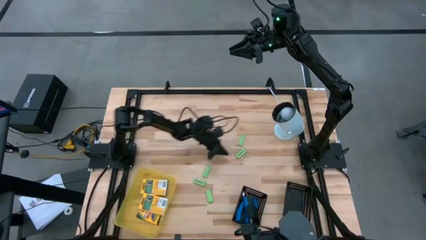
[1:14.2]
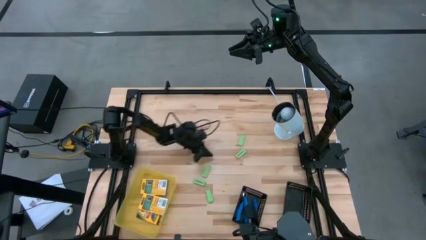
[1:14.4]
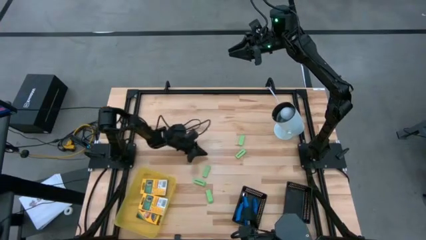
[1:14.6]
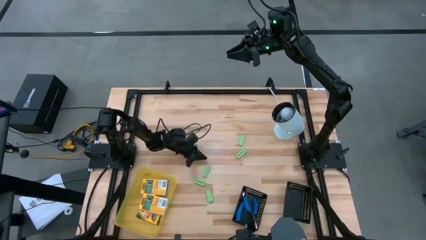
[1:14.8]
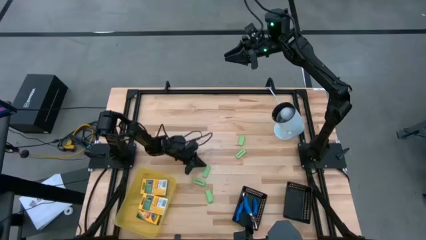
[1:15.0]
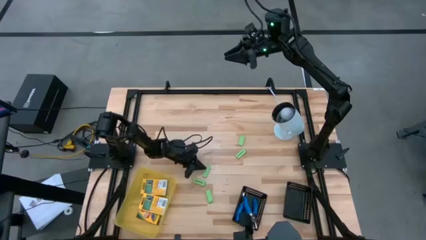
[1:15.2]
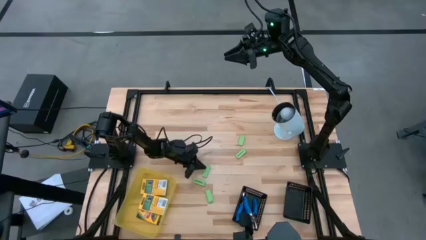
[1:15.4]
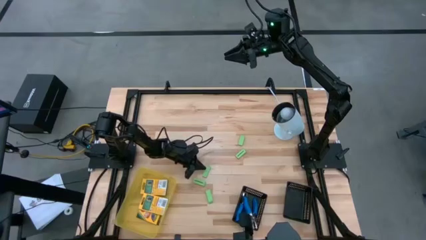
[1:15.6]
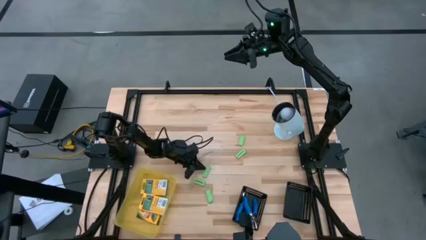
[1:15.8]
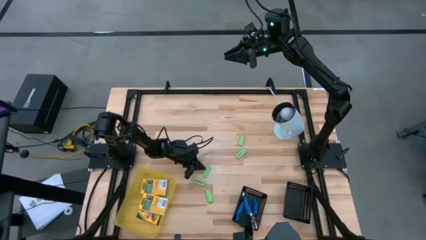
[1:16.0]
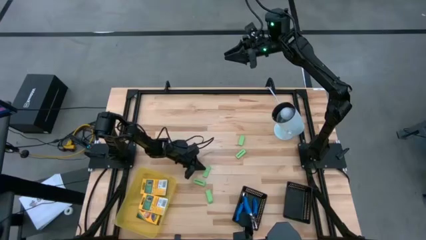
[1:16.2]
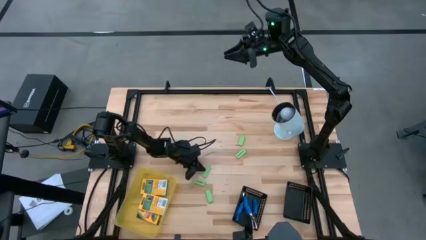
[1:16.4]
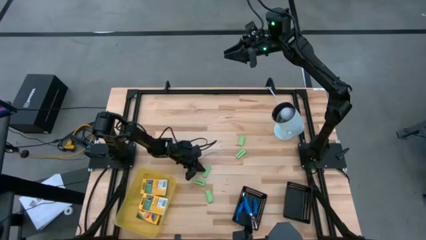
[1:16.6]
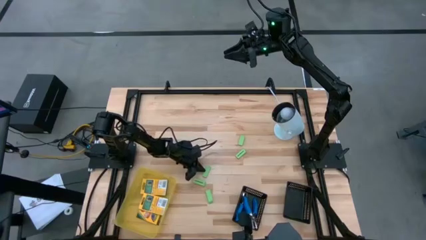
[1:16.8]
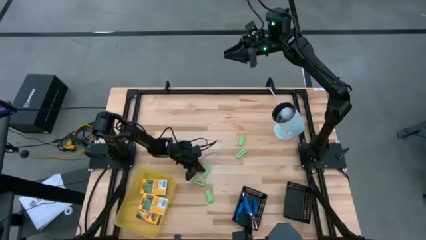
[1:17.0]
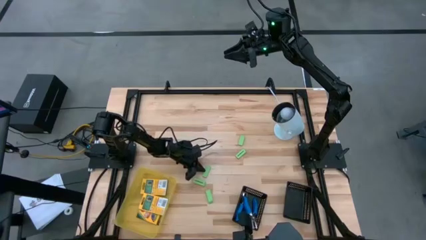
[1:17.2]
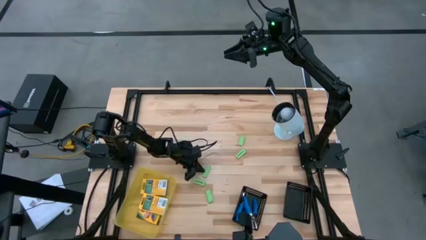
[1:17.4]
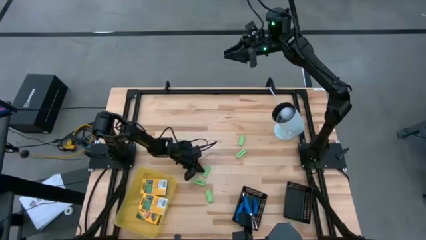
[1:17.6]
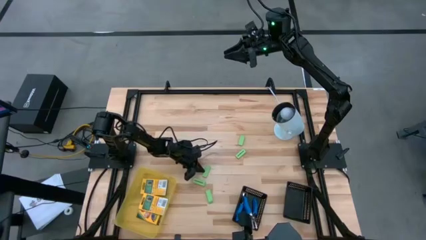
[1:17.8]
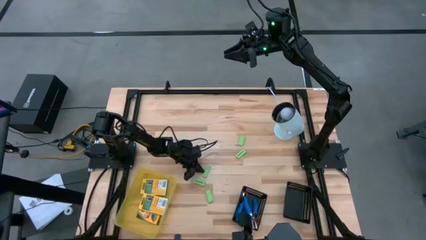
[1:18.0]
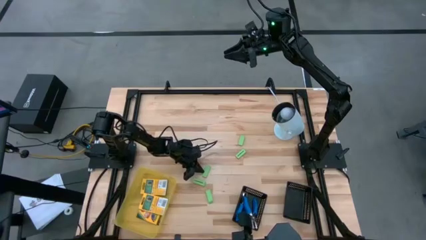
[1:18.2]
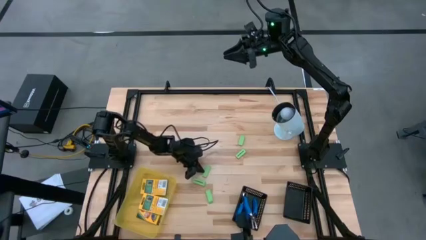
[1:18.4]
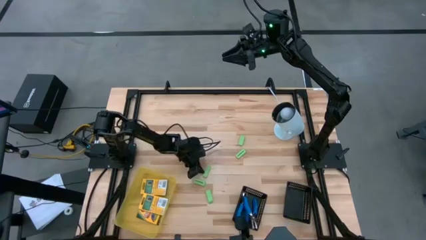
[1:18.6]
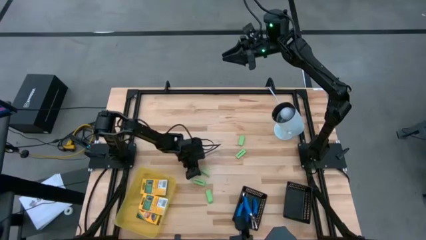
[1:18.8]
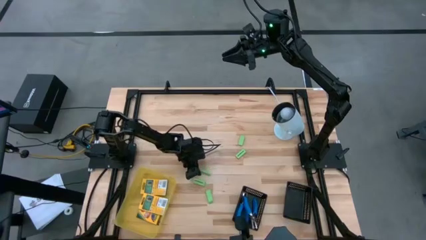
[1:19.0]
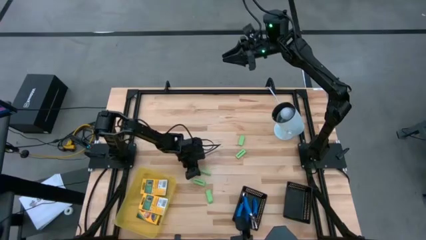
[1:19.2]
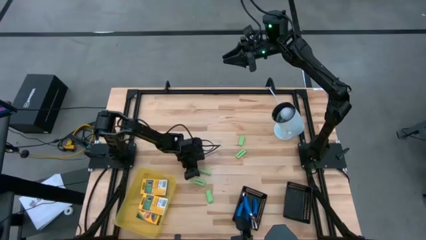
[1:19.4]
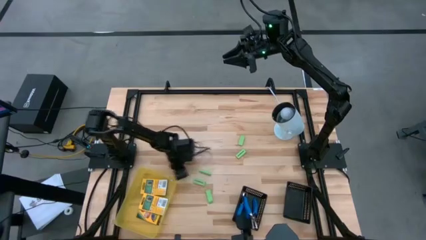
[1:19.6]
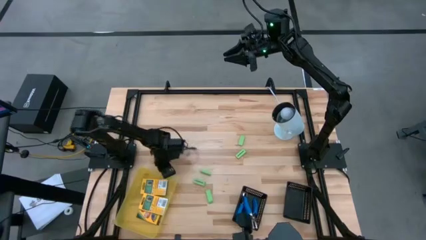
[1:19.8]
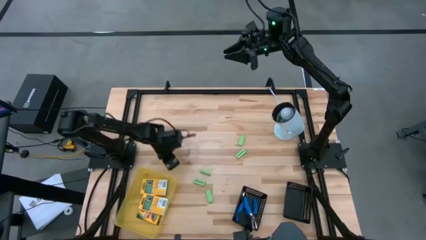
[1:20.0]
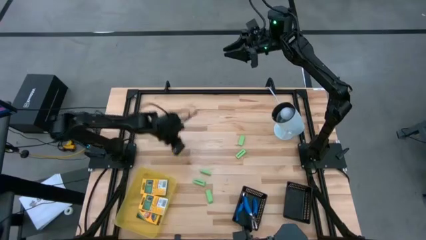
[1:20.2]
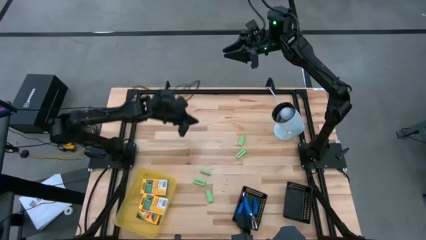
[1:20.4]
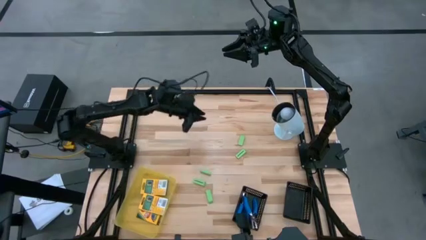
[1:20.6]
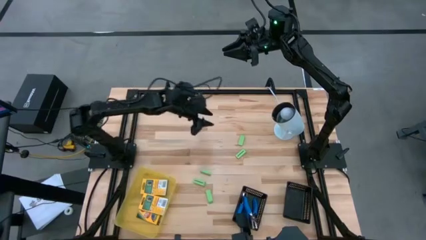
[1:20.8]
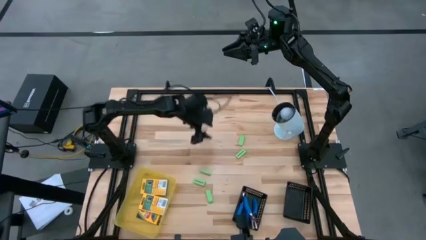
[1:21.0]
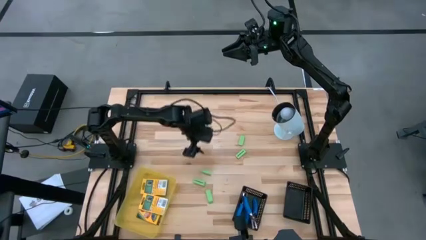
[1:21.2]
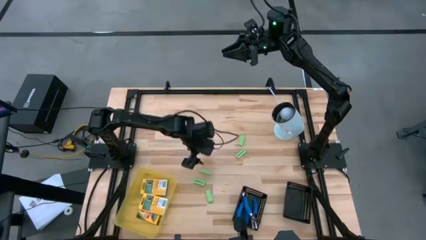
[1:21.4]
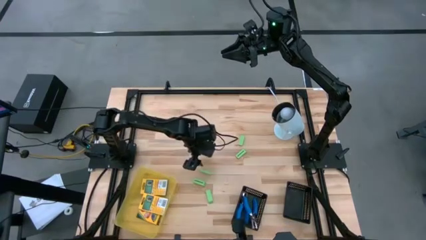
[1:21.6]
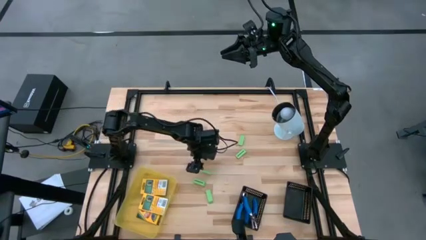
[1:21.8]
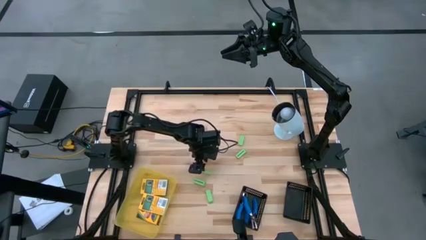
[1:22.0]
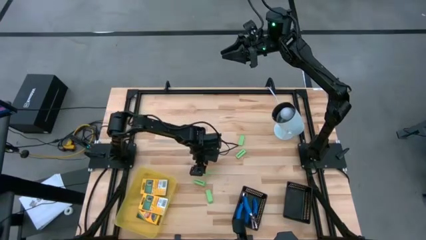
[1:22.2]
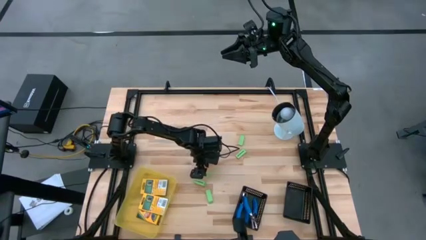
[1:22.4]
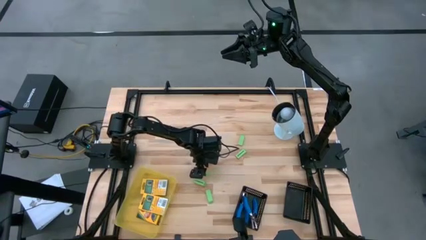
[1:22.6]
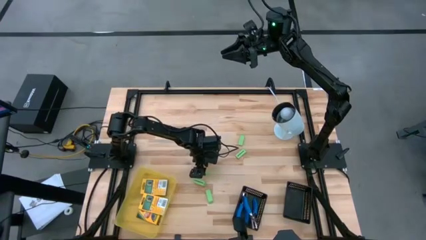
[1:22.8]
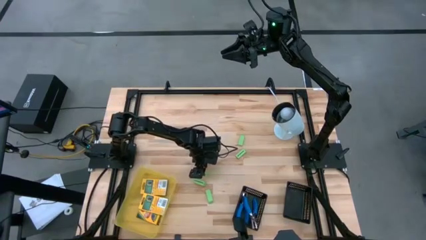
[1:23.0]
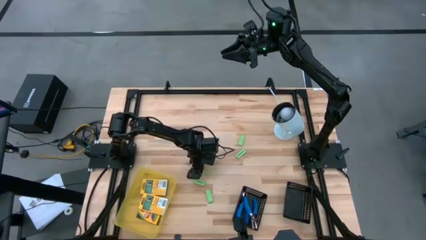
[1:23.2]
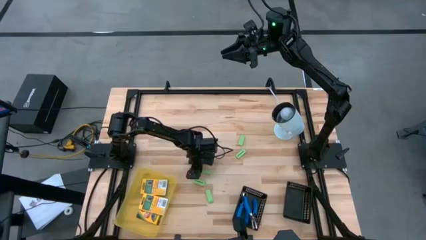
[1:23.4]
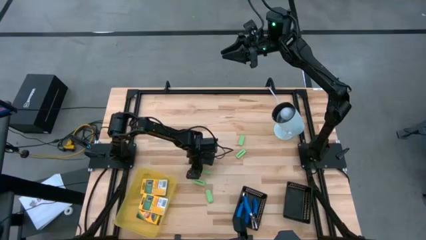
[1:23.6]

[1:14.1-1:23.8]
Task: Pick & Place School Supplies
Put the green eraser into the right black bin

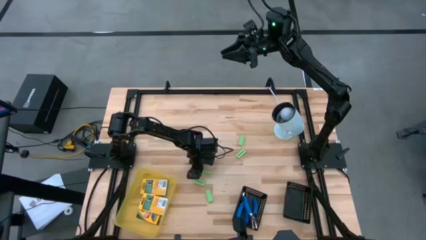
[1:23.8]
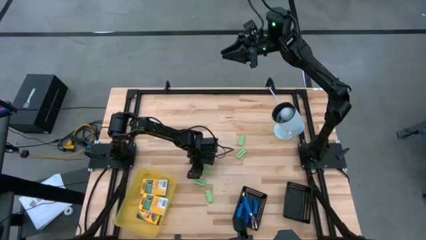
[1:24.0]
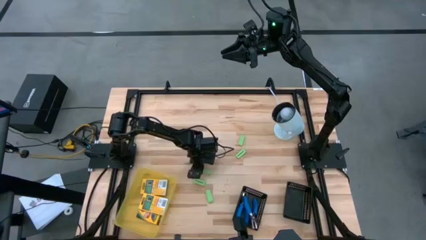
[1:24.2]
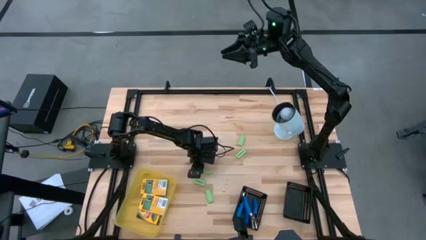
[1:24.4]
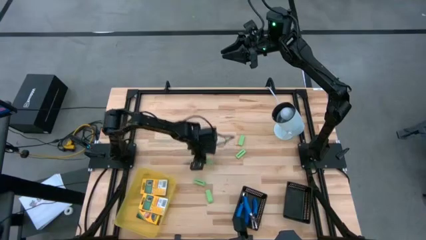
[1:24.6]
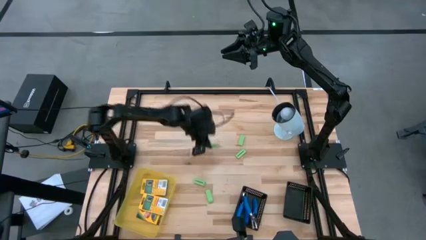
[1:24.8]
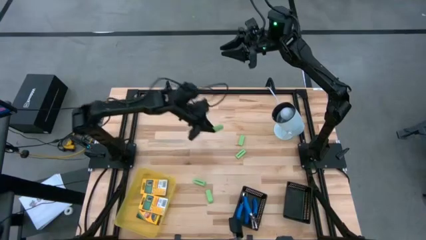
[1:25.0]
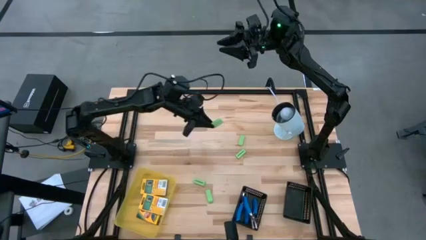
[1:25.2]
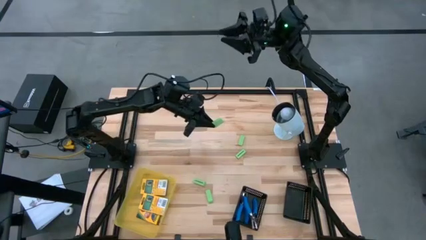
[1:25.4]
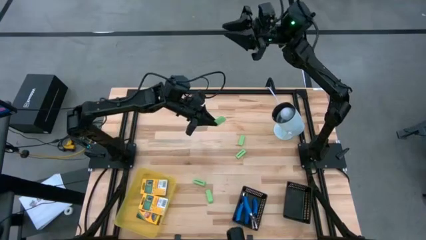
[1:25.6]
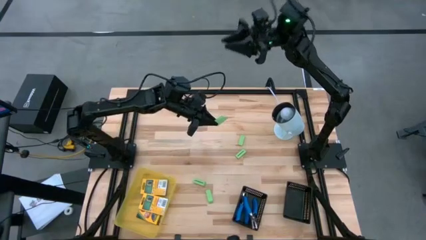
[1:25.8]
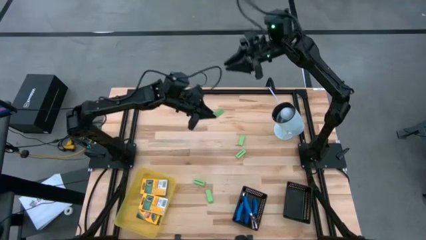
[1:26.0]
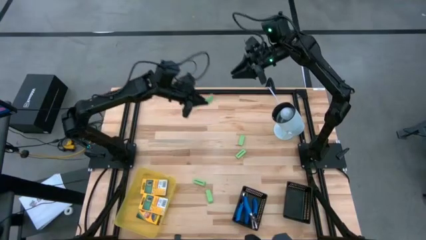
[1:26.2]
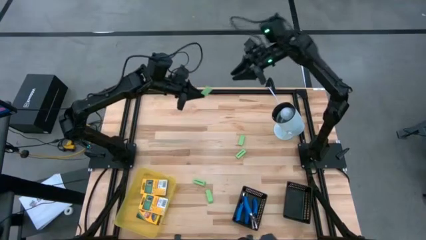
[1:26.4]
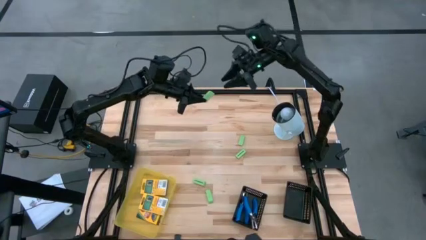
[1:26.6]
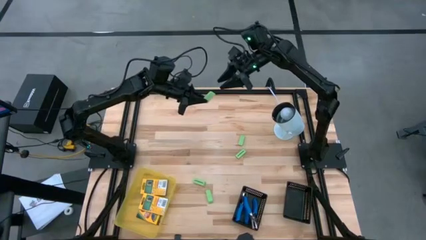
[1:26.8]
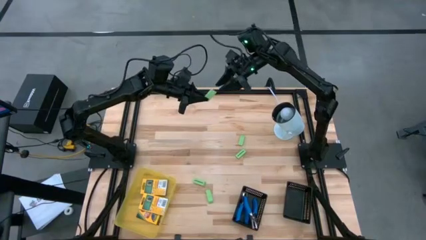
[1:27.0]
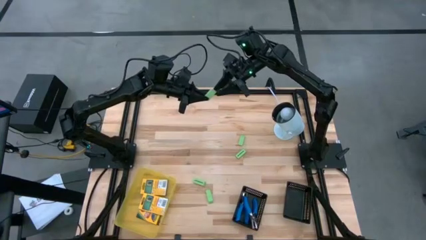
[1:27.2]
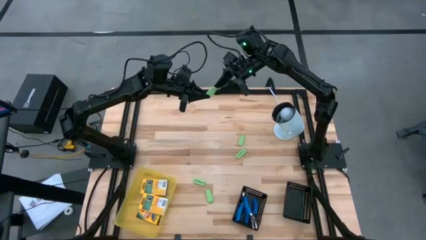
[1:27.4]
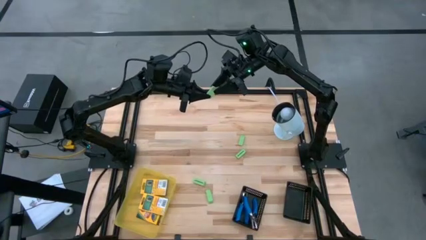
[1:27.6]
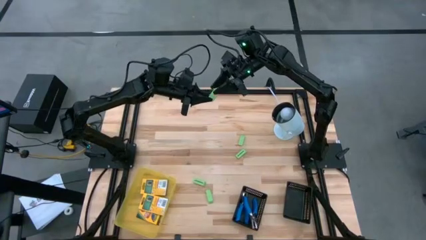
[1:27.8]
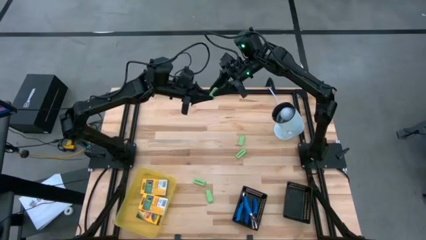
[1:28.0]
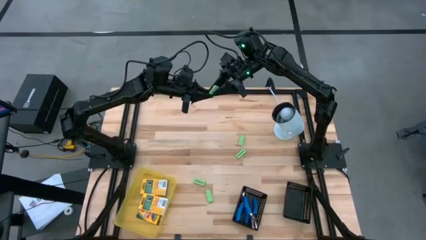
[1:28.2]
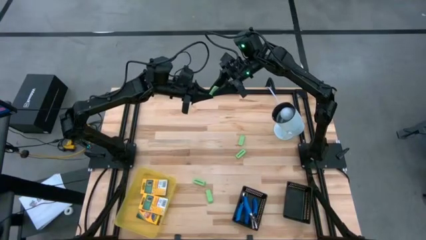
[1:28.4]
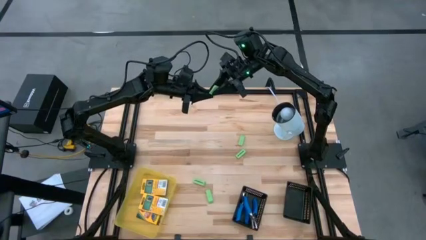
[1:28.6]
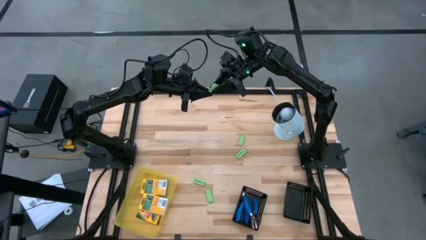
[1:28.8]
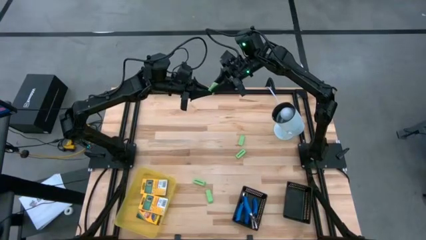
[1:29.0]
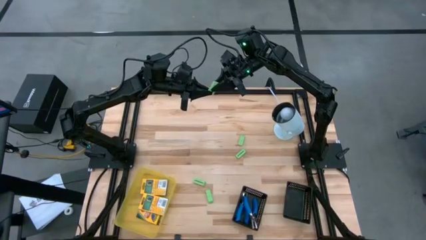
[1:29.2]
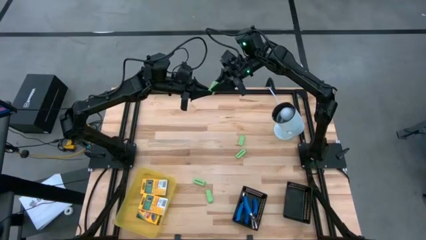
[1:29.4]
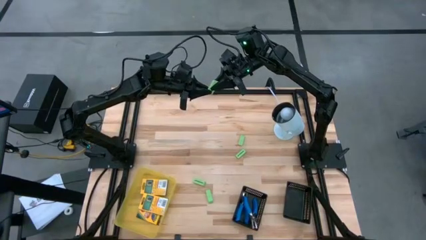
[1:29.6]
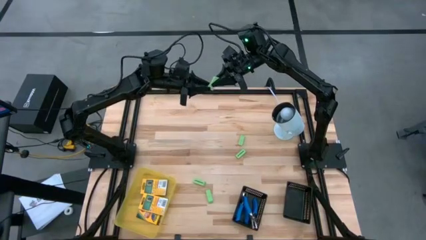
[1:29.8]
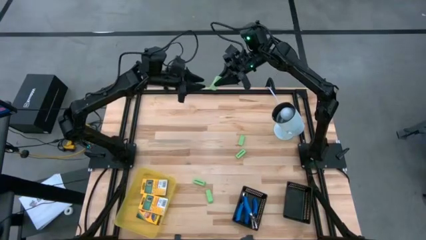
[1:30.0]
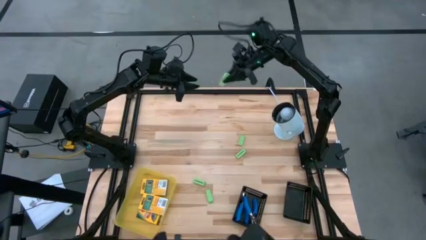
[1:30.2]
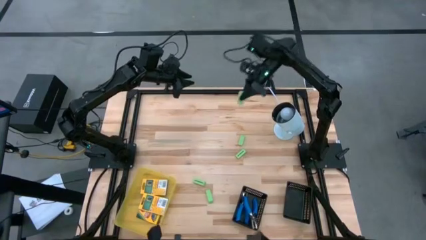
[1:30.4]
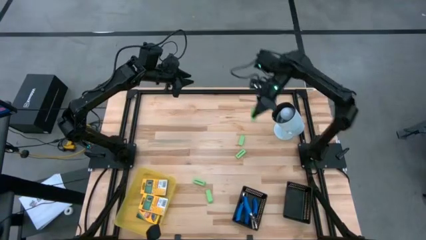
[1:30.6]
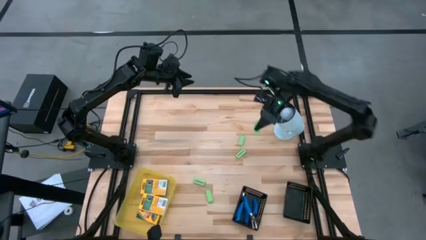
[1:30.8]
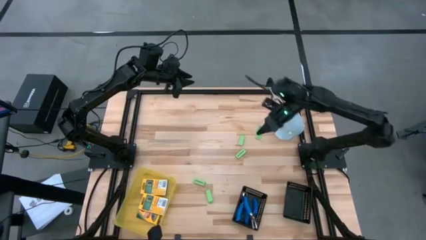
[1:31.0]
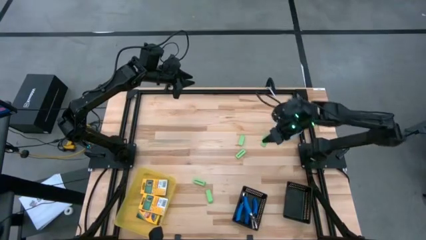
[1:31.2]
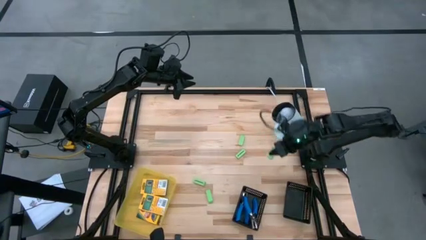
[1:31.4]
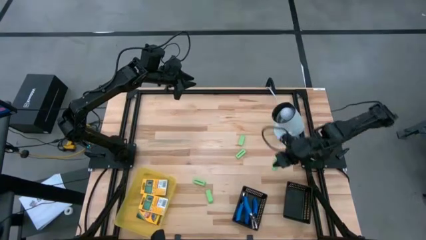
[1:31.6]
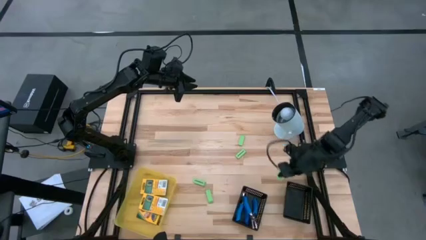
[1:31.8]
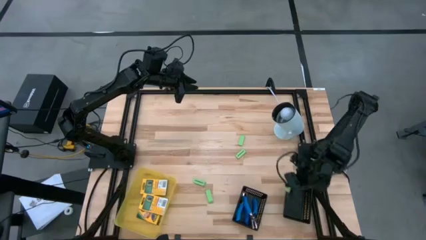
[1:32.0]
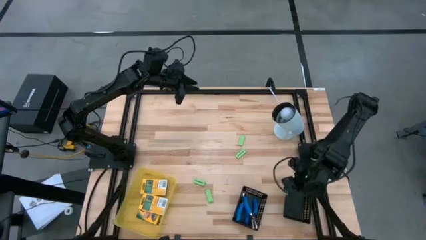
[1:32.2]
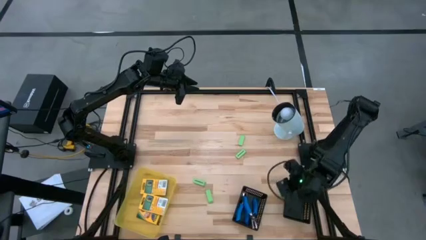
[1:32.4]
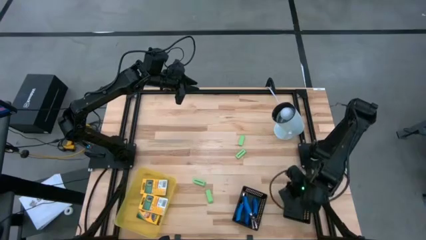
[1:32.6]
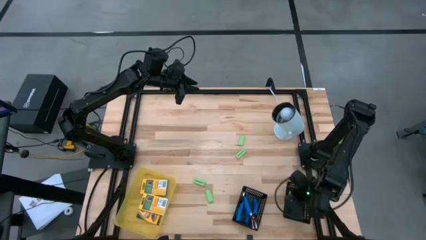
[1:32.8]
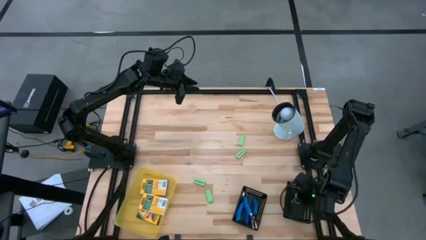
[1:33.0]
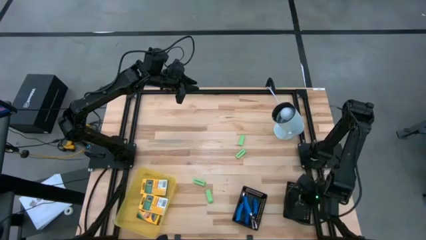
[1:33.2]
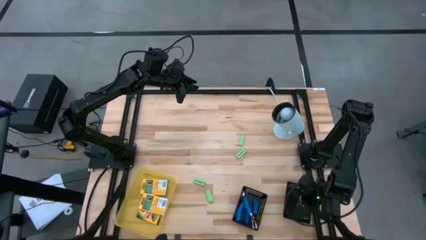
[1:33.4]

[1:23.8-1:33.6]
Put the green eraser into the right black bin
